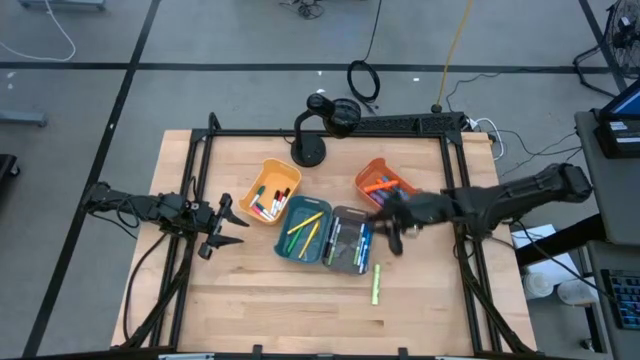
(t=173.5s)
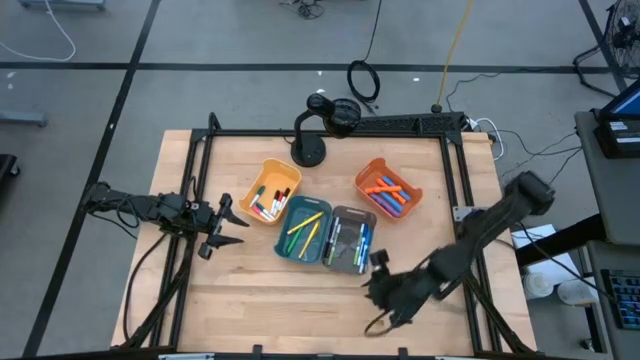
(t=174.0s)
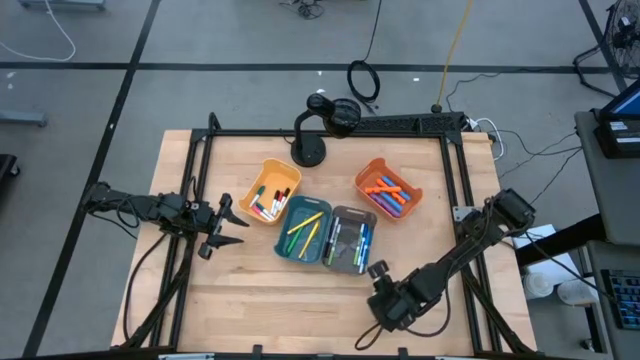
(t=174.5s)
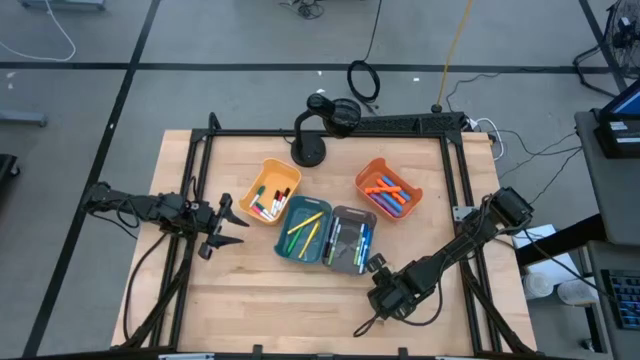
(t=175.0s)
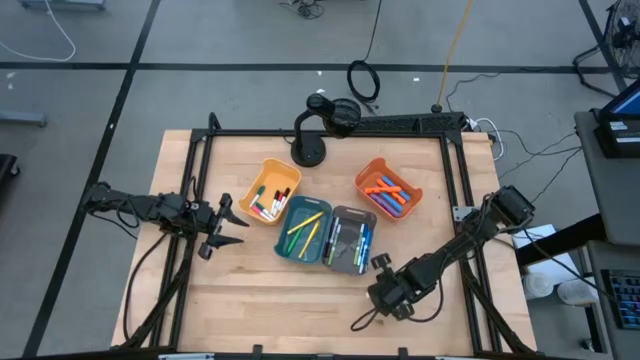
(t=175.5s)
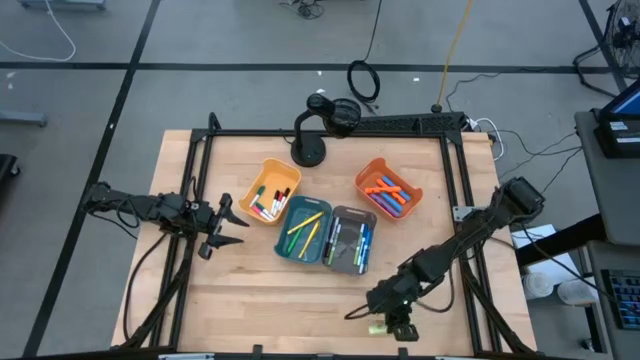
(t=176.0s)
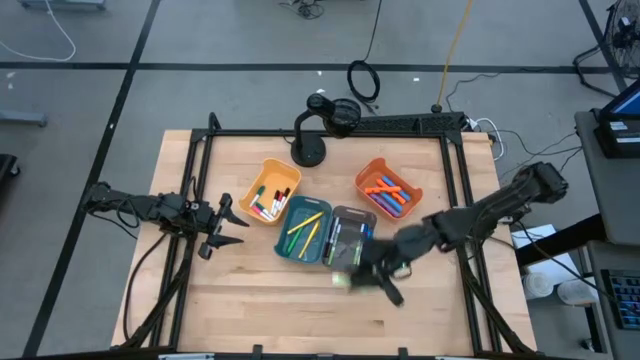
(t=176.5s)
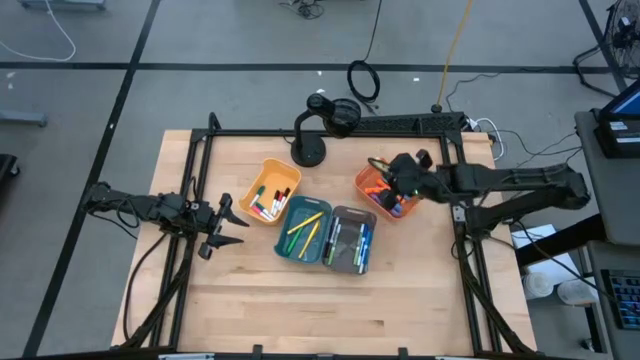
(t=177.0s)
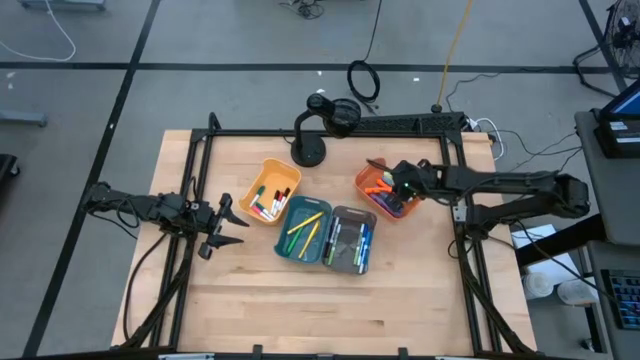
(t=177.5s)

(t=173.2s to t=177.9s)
Task: Pick & Place Markers
Put the light green highlighter into the orange bin

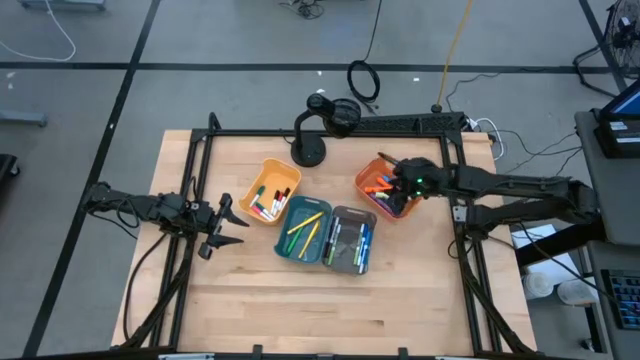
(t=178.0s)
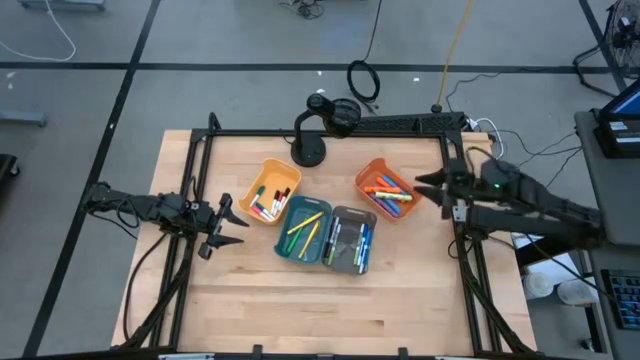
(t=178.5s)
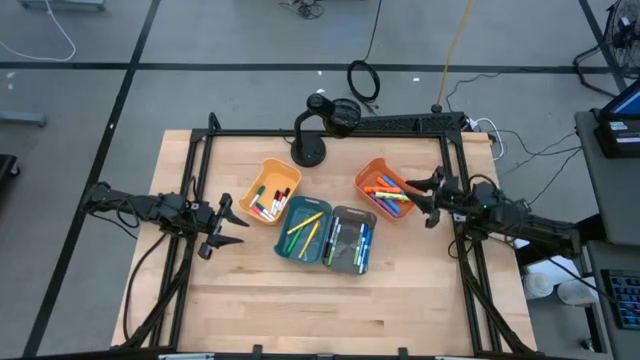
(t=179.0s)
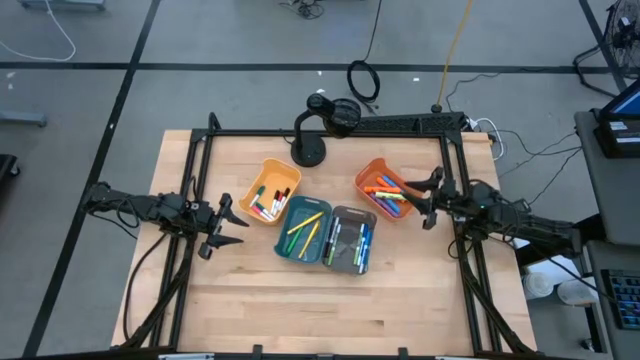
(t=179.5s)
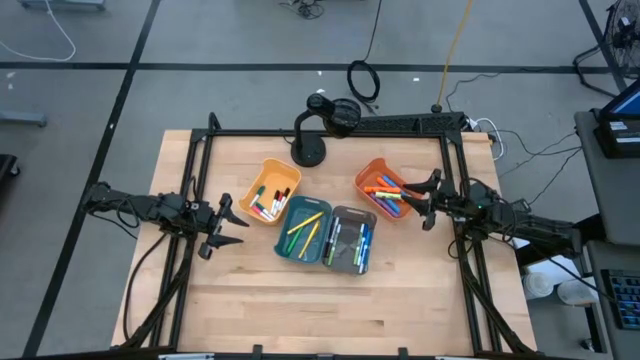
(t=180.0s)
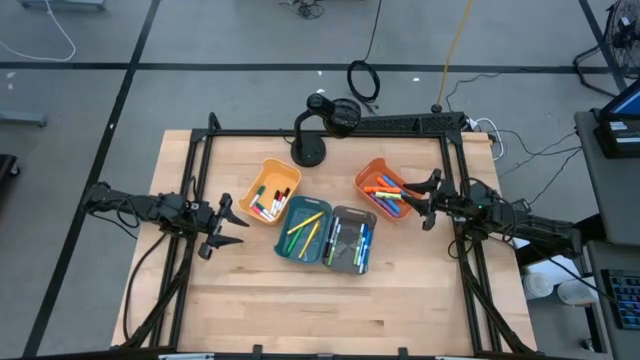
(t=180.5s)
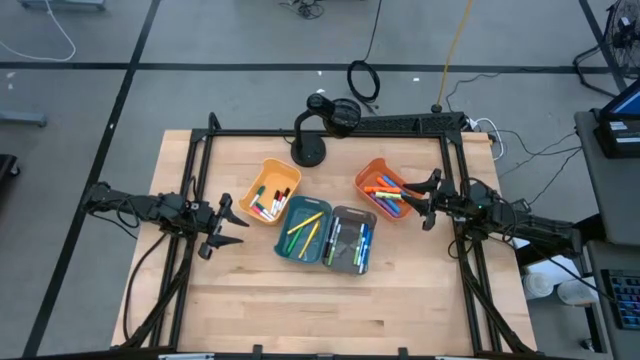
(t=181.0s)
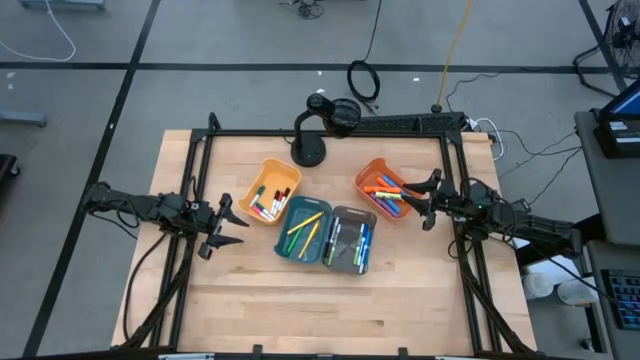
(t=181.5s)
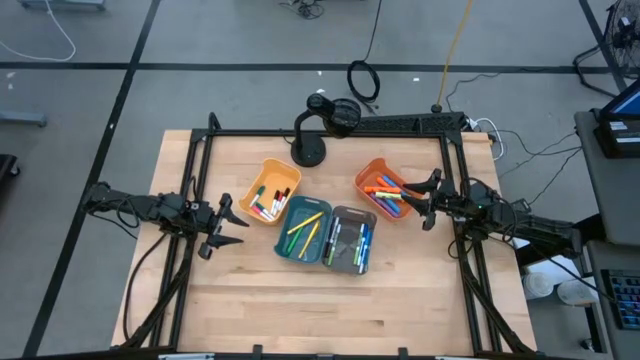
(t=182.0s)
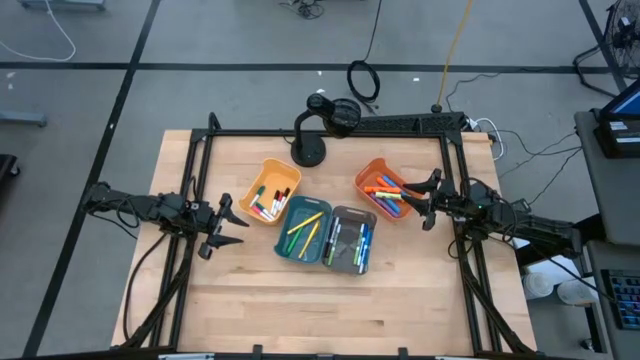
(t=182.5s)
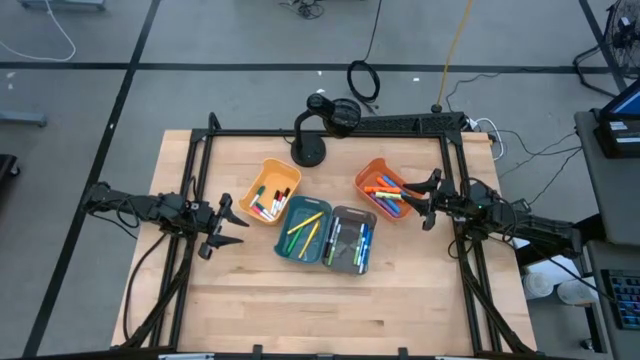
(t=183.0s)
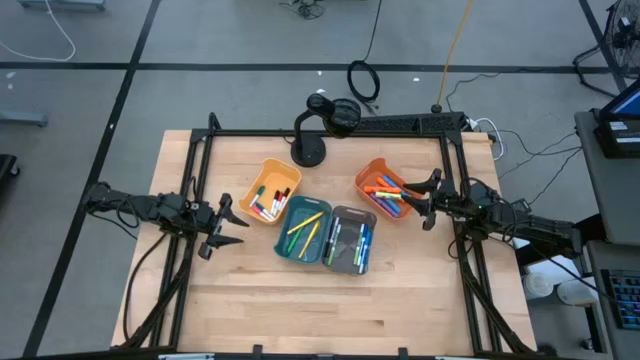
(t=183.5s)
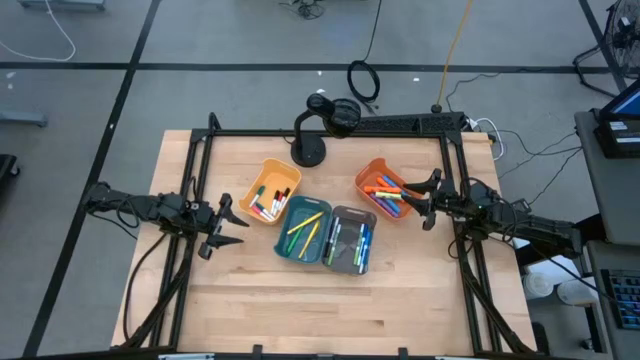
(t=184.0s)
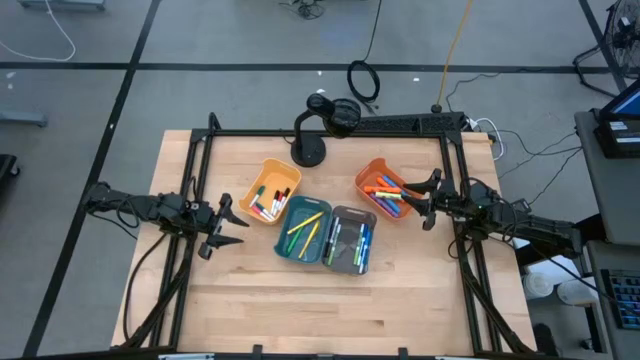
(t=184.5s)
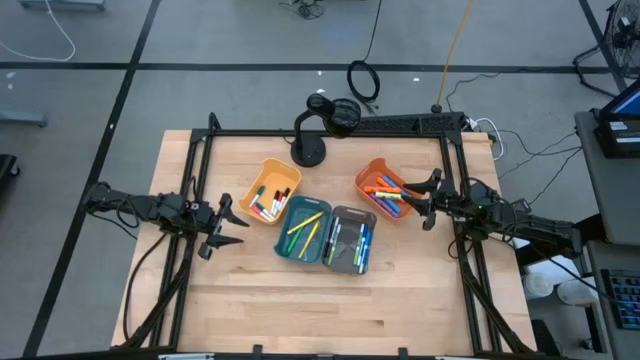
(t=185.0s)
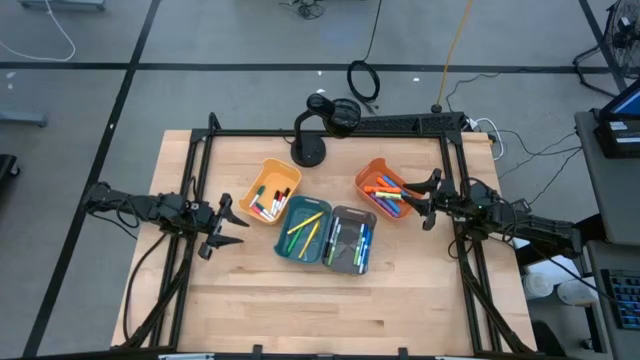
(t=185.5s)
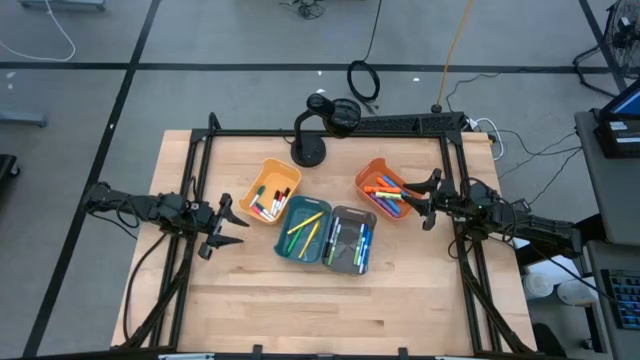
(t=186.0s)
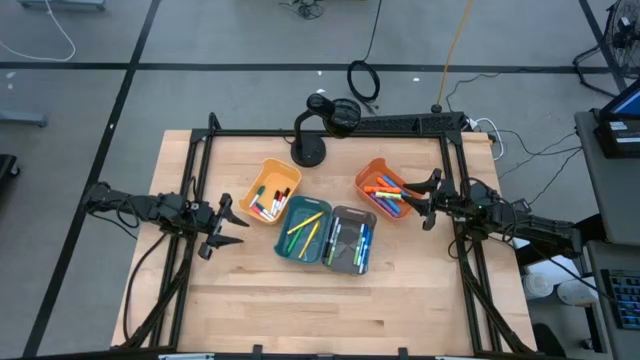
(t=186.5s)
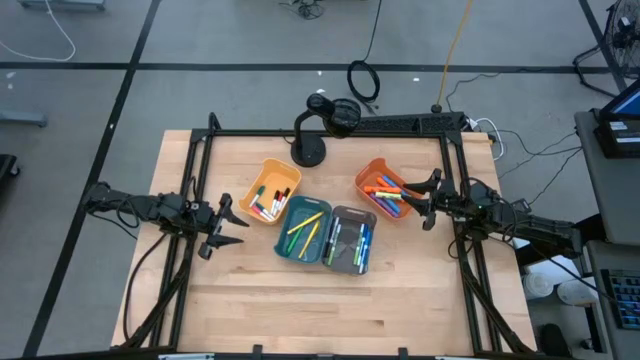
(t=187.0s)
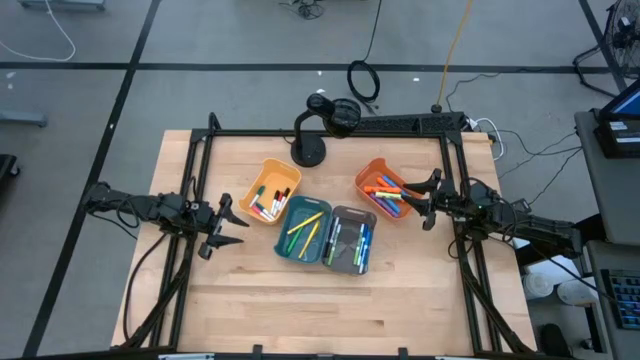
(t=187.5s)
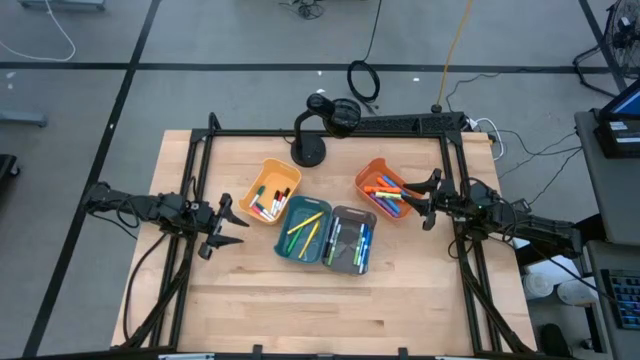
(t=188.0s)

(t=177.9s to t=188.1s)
Return to Home Position

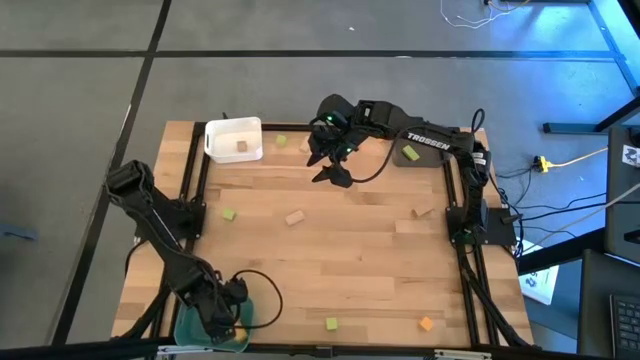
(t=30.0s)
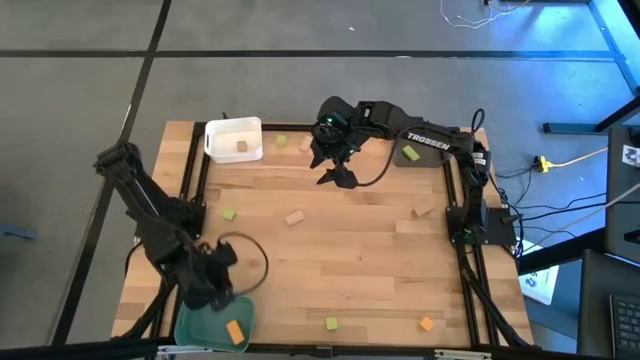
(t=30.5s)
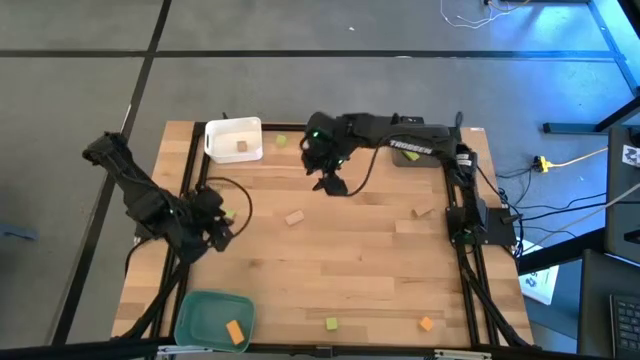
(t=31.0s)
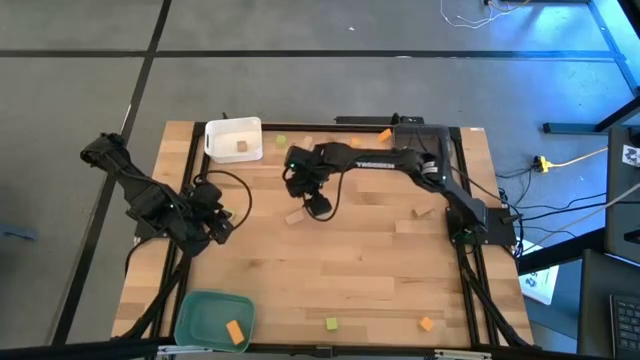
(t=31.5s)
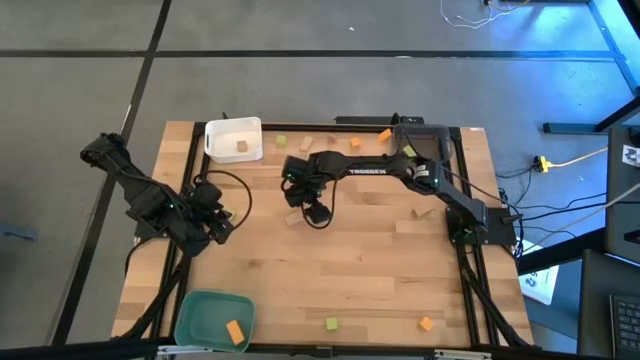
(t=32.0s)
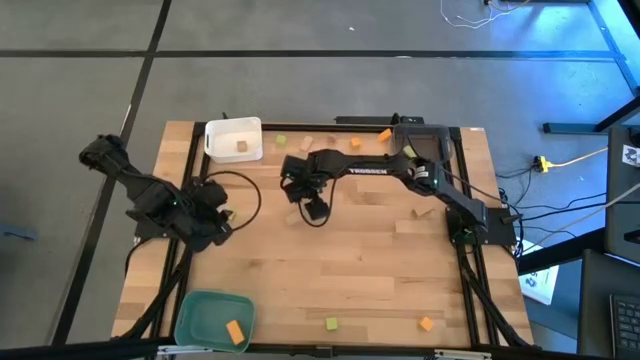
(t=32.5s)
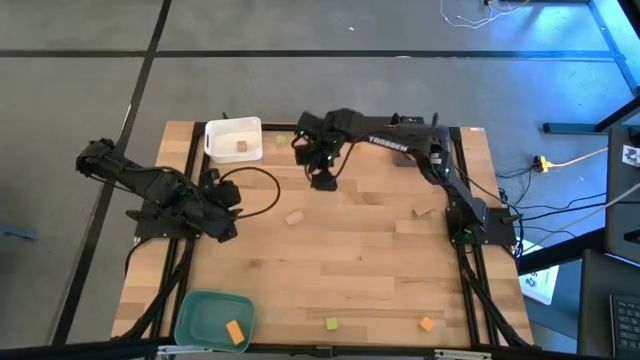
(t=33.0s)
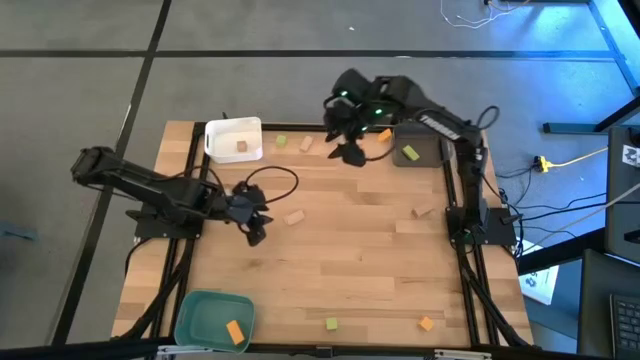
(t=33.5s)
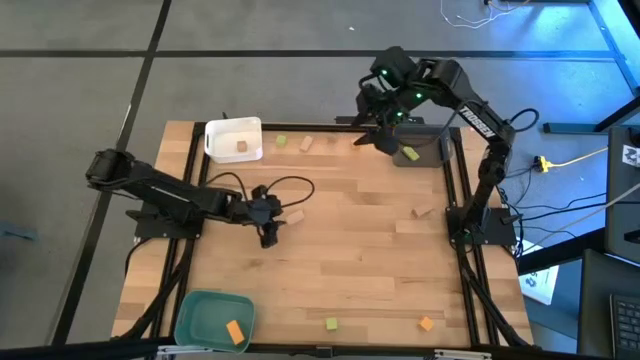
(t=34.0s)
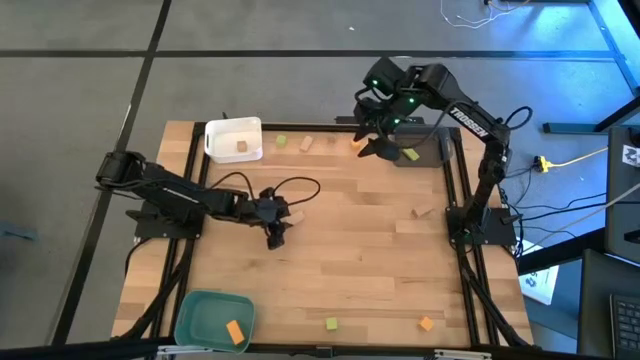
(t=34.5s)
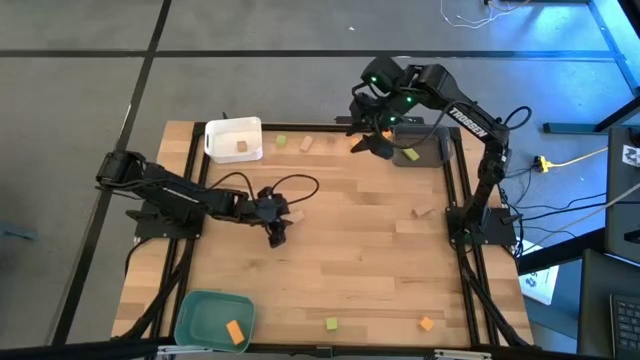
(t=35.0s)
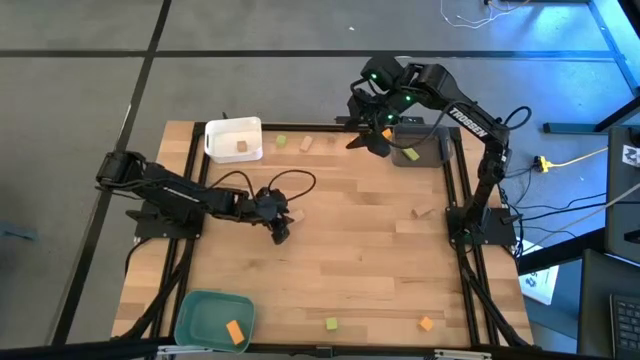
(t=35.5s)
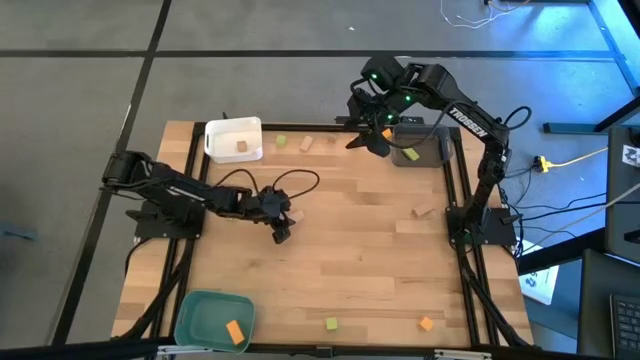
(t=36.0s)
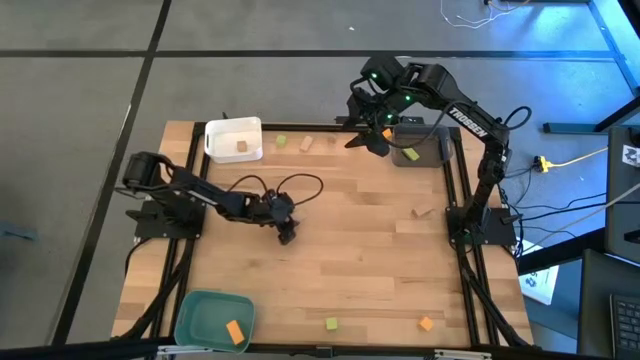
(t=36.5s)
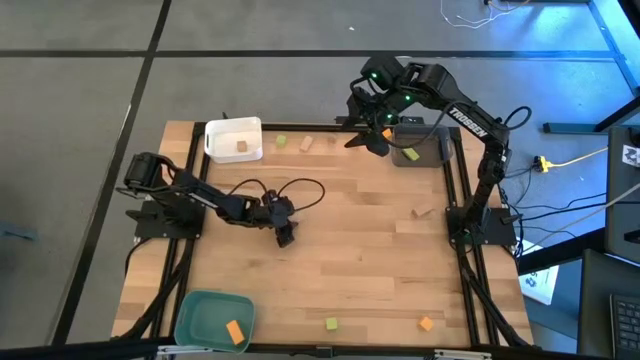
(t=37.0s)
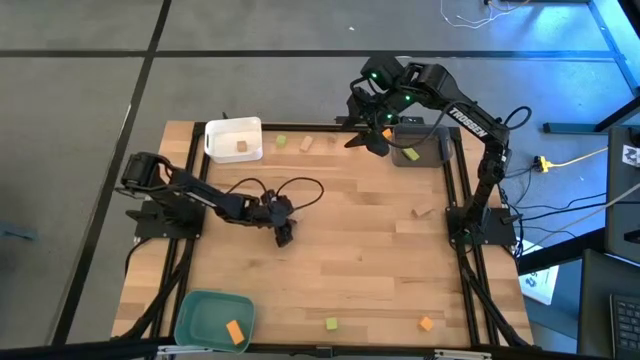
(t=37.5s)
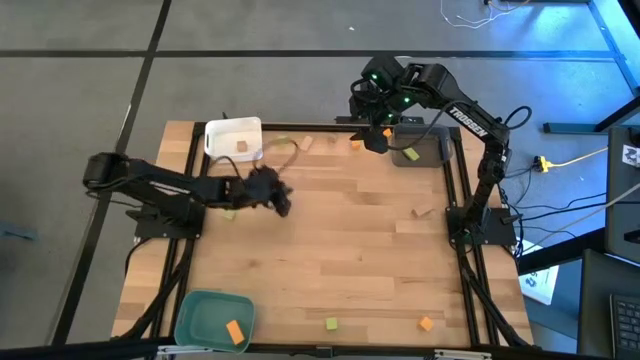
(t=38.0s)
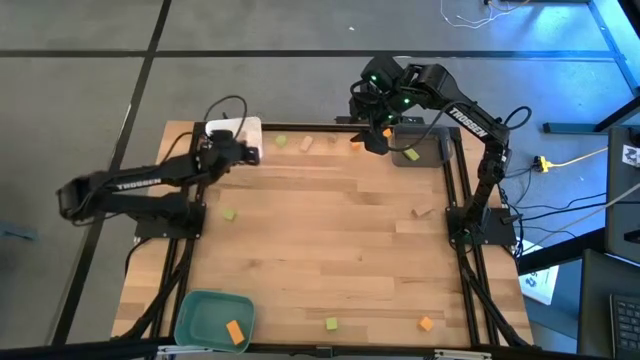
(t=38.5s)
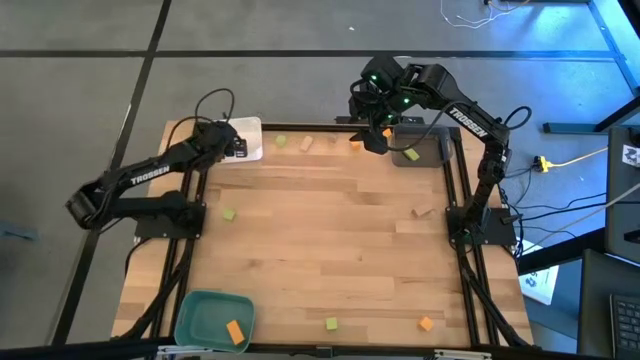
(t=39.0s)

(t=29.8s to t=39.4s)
Task: Sort & place blocks by color
Put the brown block into the white bin
